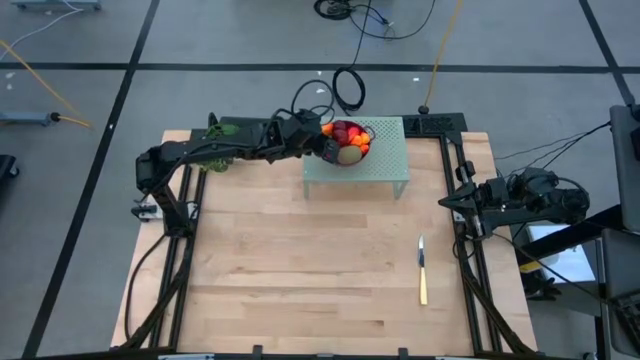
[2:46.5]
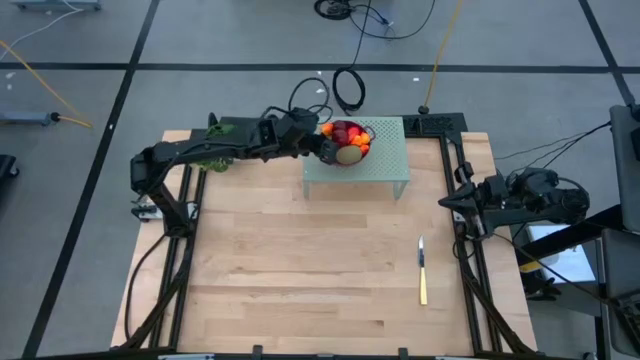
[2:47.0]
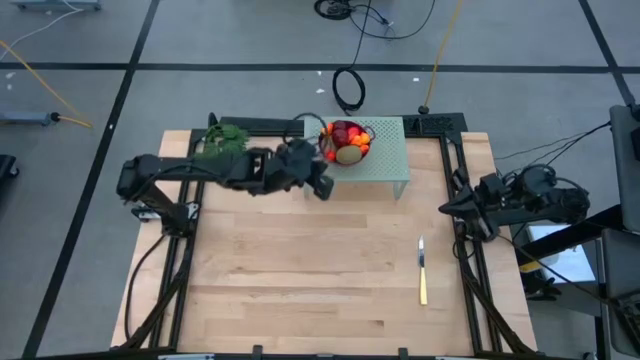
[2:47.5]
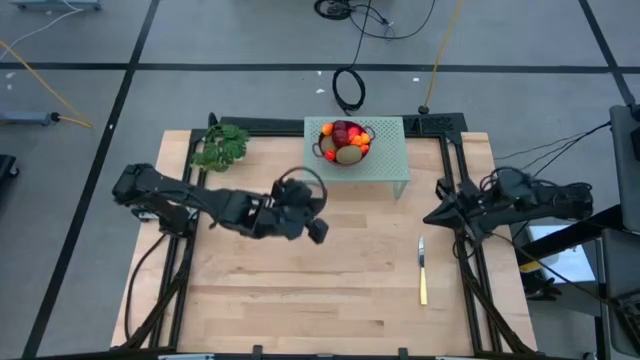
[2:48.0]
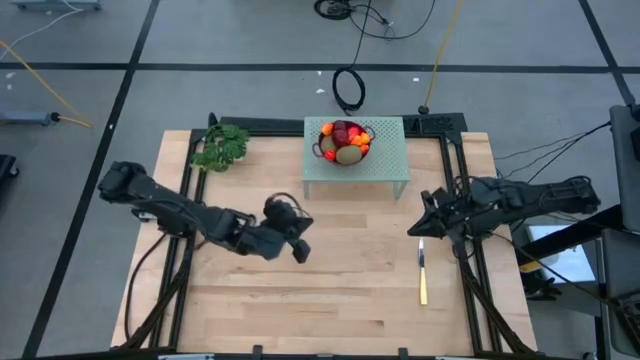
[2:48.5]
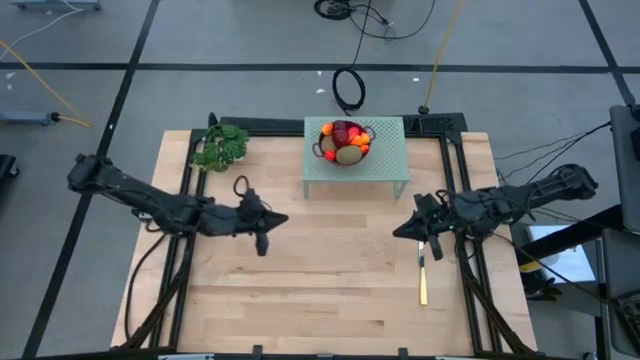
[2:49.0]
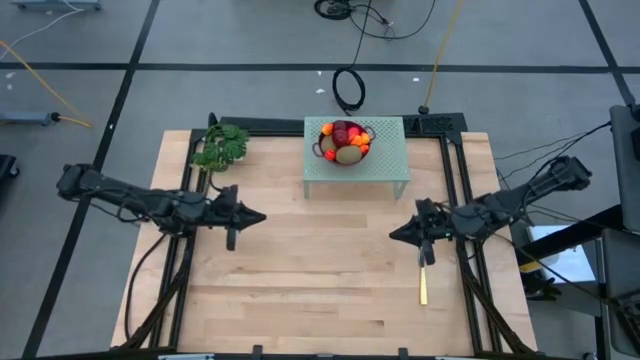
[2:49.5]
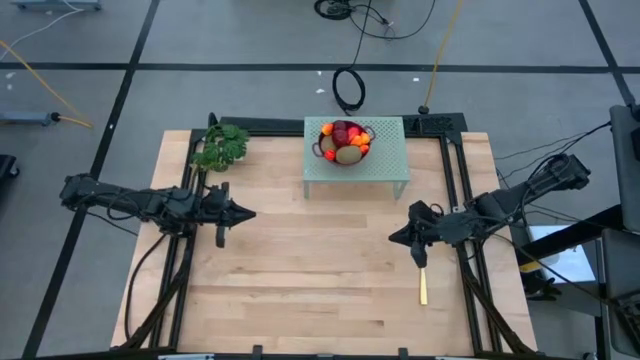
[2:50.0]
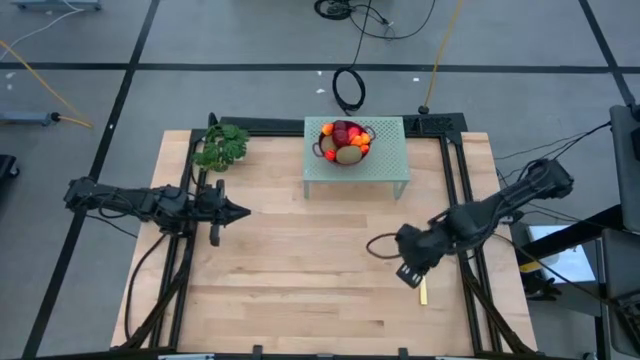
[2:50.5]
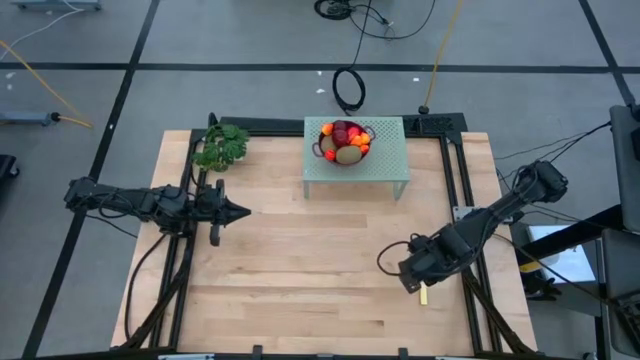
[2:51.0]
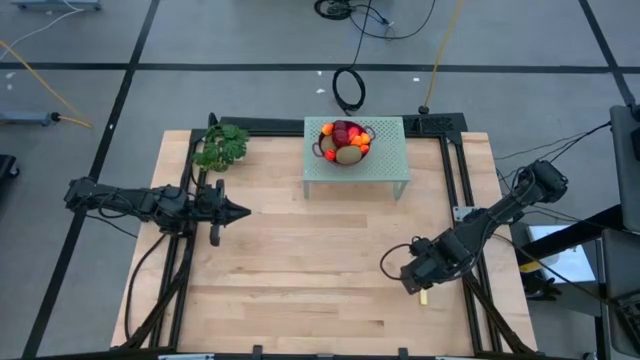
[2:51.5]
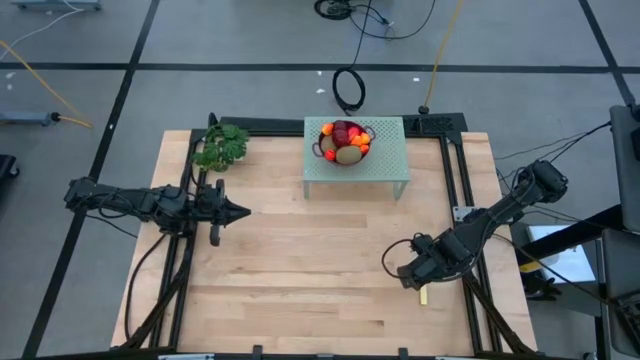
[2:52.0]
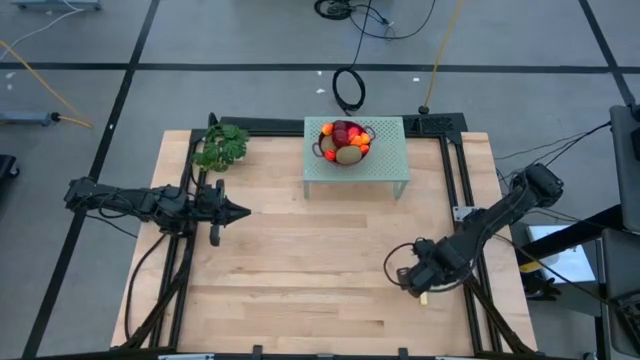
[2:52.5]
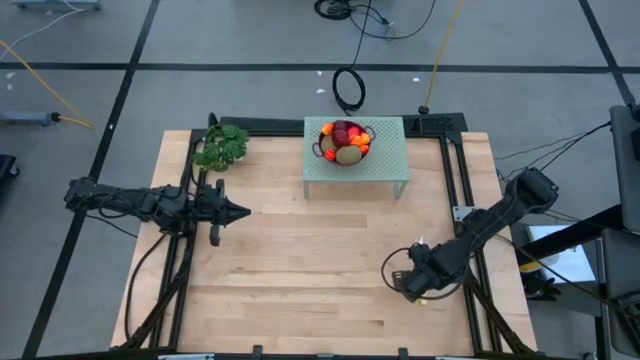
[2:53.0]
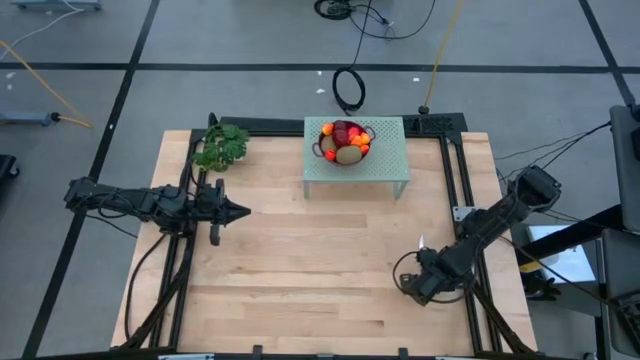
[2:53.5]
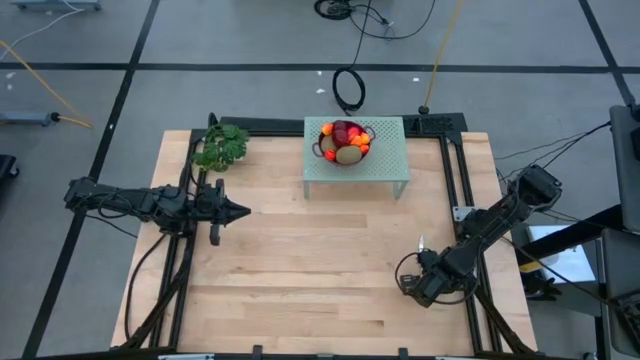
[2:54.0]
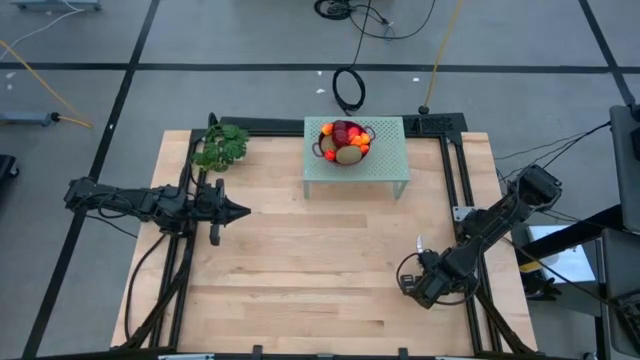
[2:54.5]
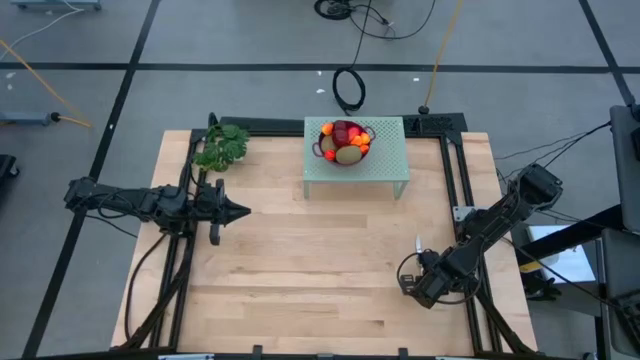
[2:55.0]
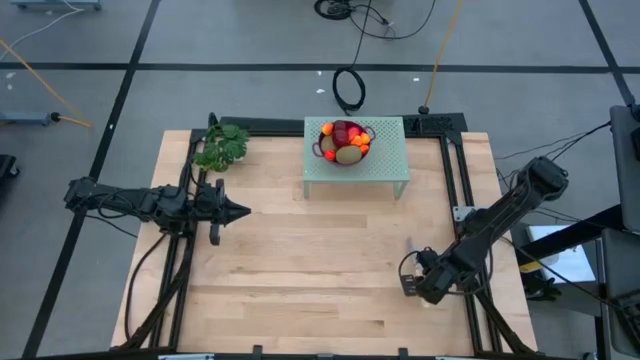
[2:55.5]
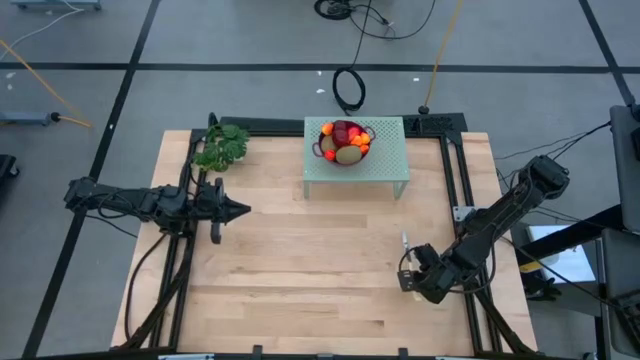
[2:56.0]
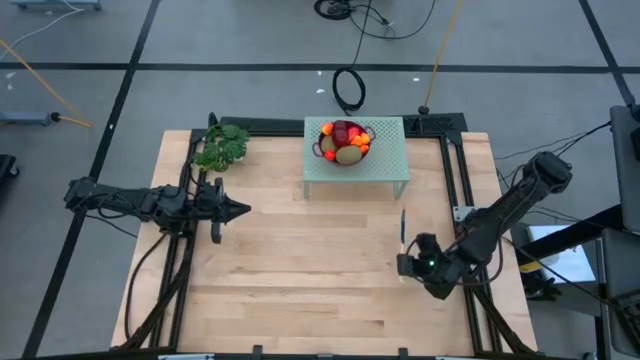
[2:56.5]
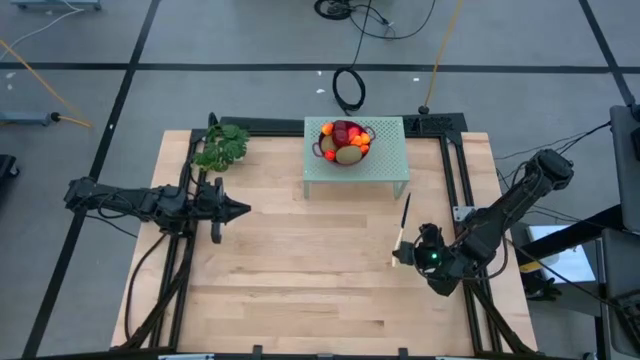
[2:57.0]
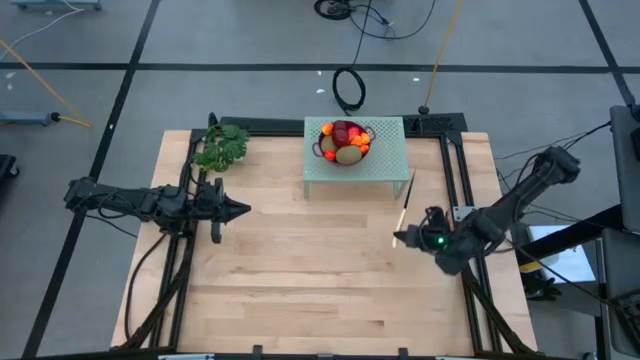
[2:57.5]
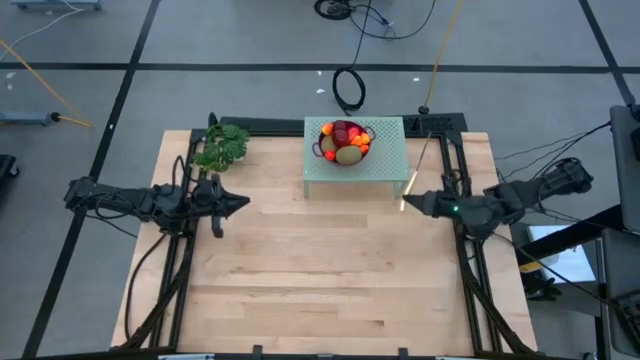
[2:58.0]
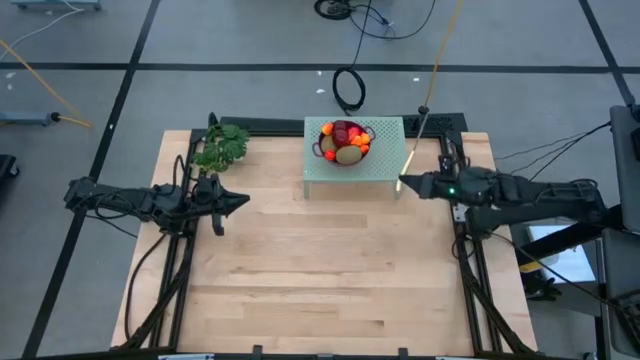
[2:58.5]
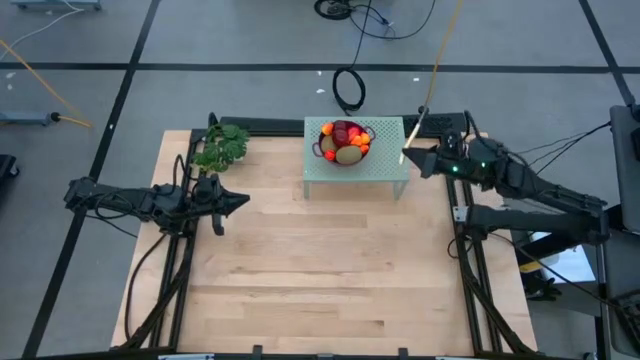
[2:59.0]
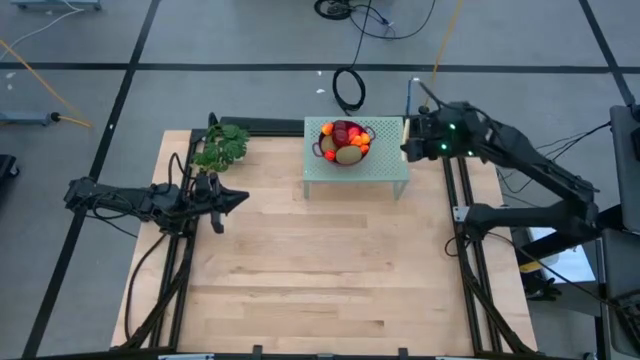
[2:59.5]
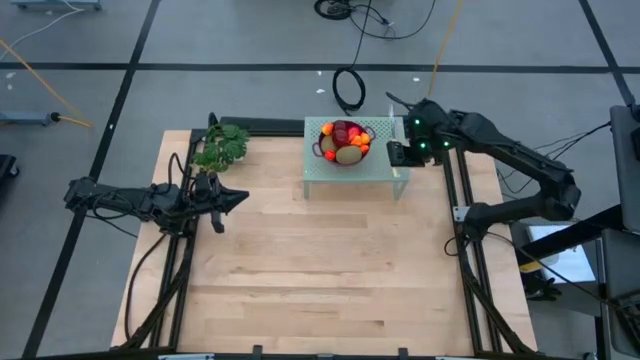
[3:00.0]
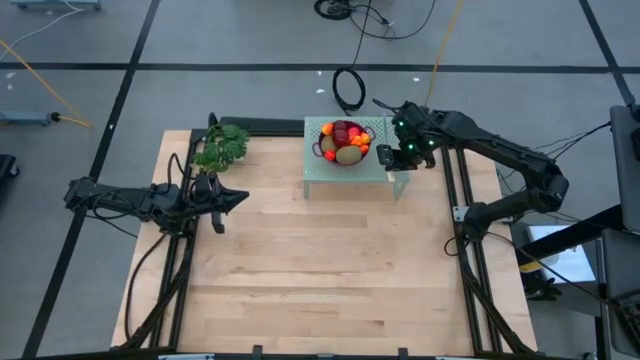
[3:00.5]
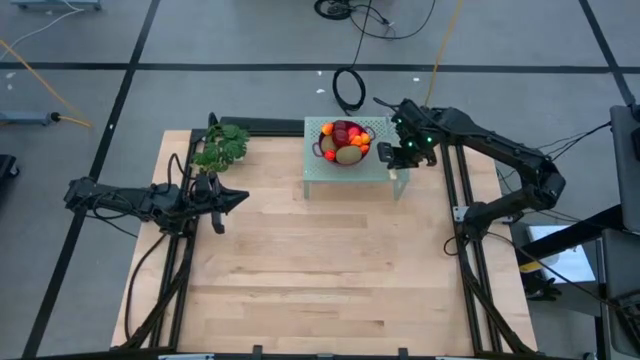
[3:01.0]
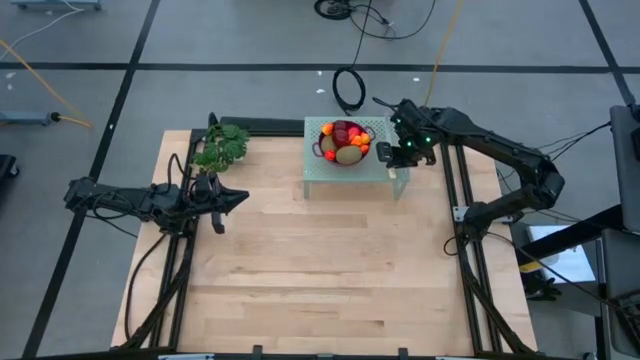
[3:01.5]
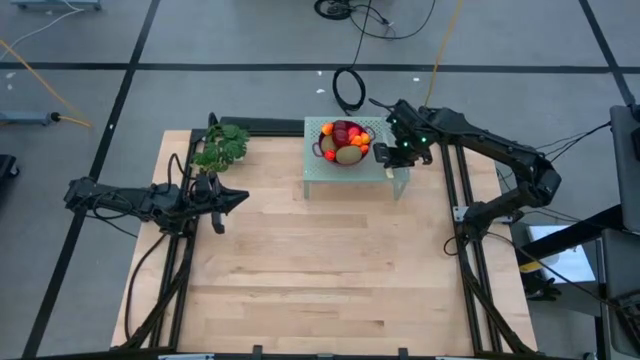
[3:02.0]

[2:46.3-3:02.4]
Task: Pick & Place Fruit
Put the knife on the shelf

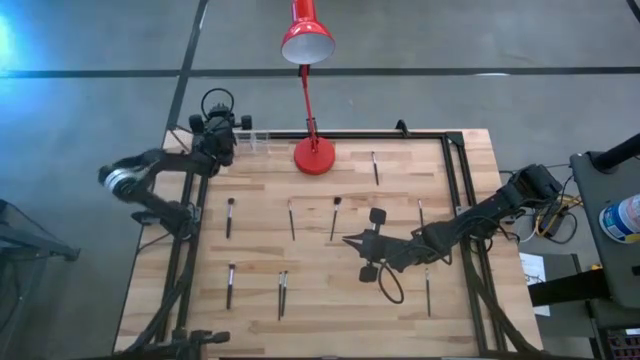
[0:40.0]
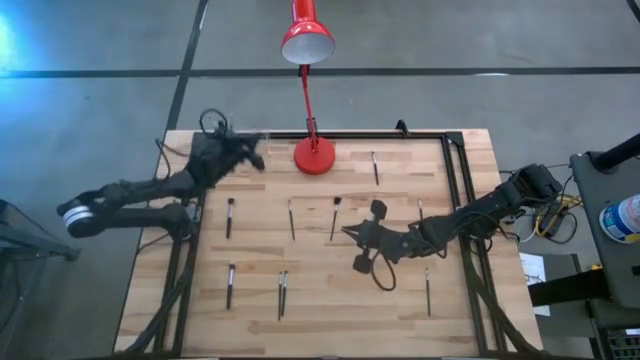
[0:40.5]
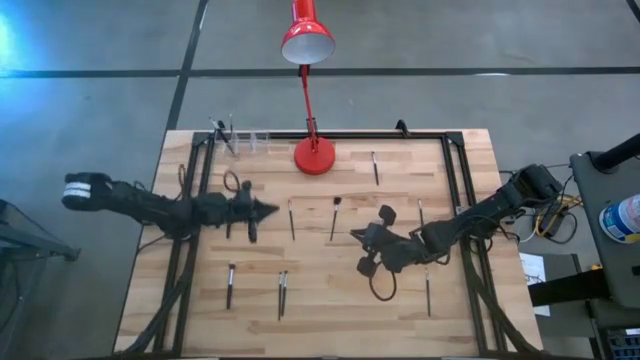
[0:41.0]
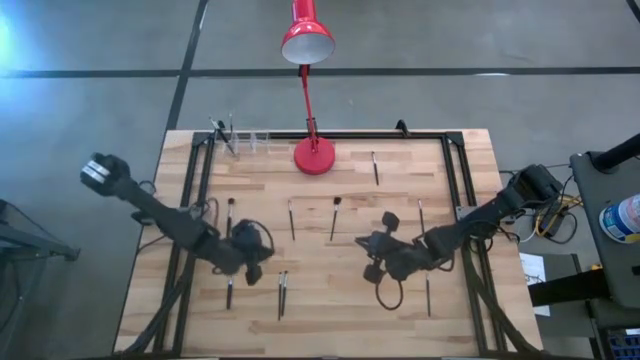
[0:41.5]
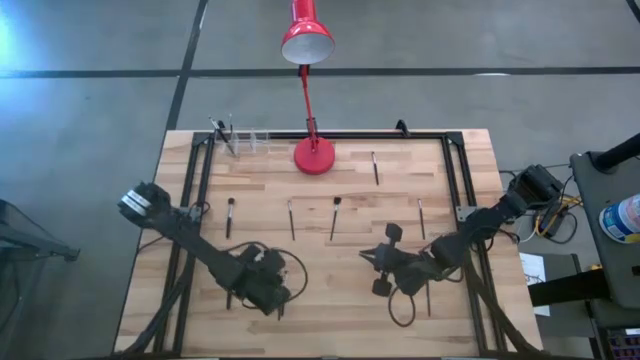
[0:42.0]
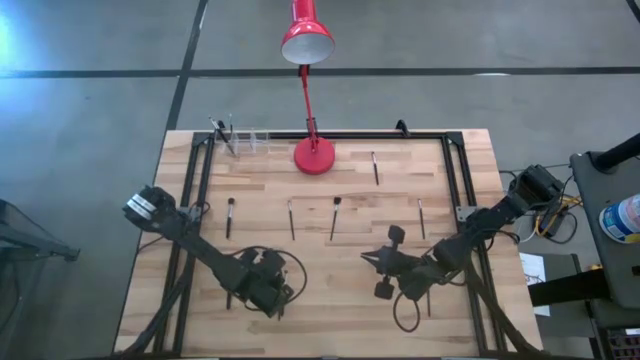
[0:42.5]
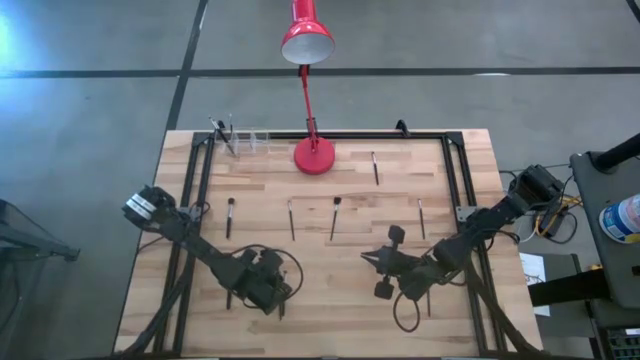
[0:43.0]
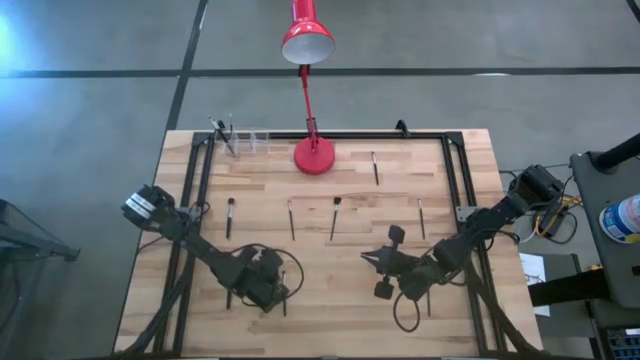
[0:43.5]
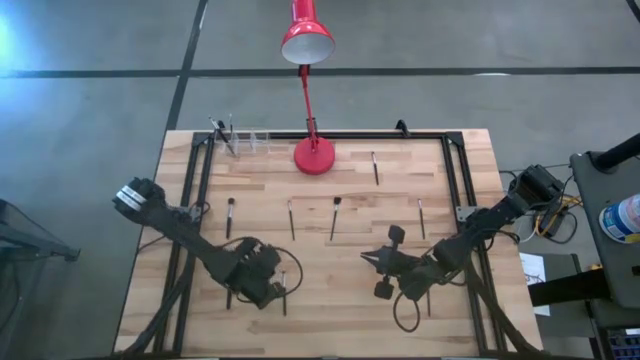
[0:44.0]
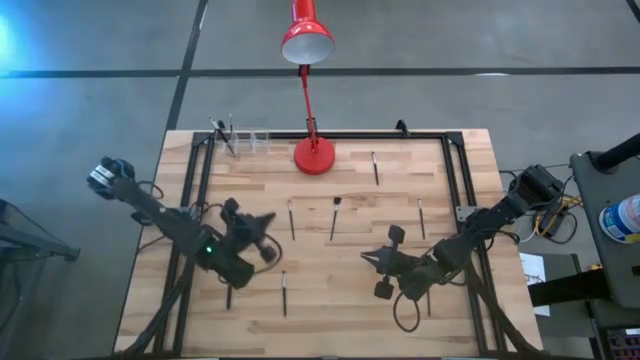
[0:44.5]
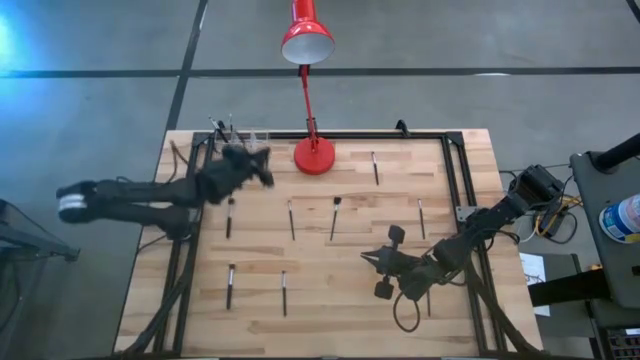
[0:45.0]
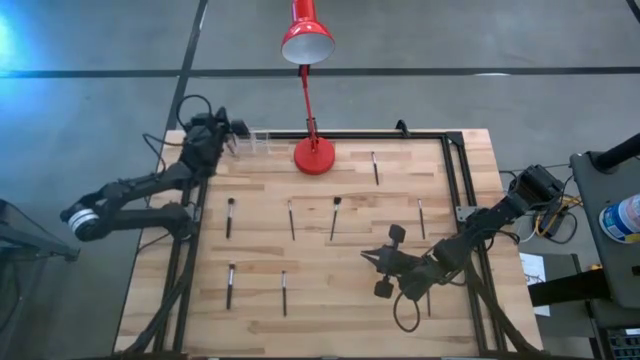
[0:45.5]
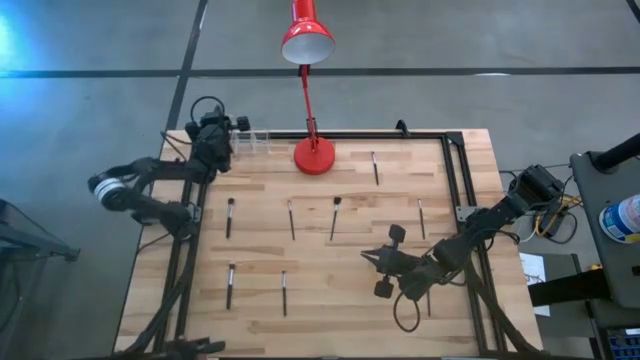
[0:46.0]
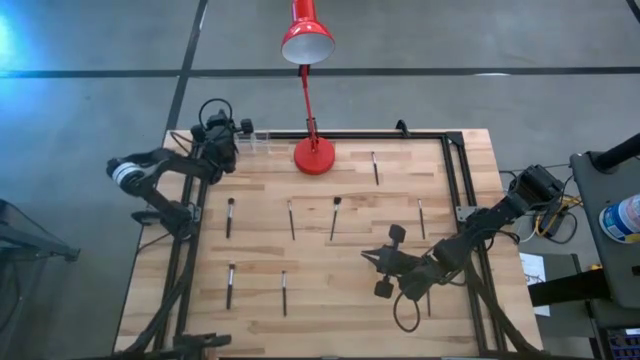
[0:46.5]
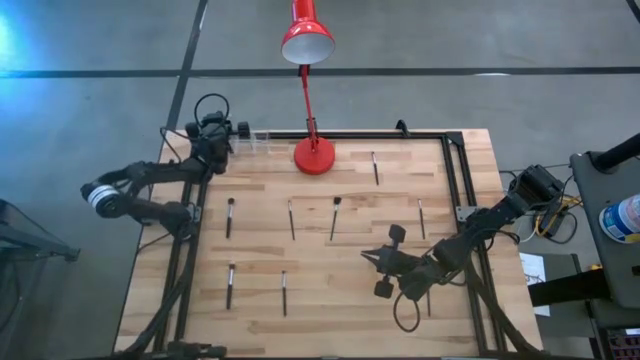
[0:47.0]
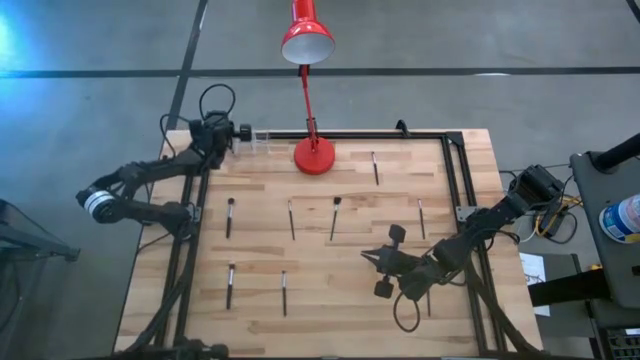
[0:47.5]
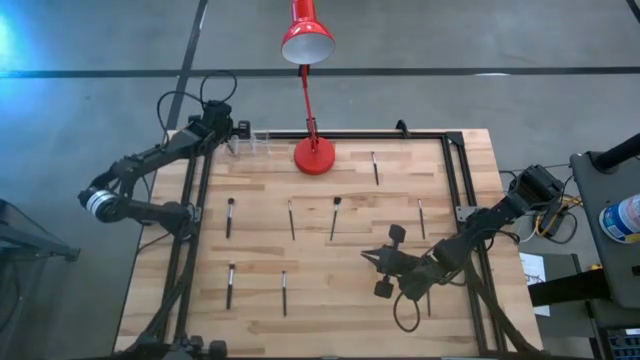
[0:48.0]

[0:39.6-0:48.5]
Task: Pick & Place Makeup Supplies
Put the makeup brush into the transparent organizer
